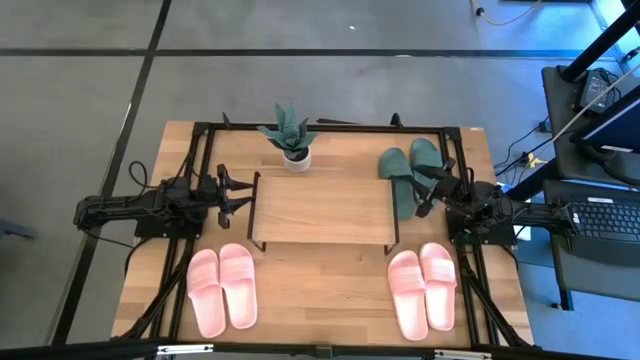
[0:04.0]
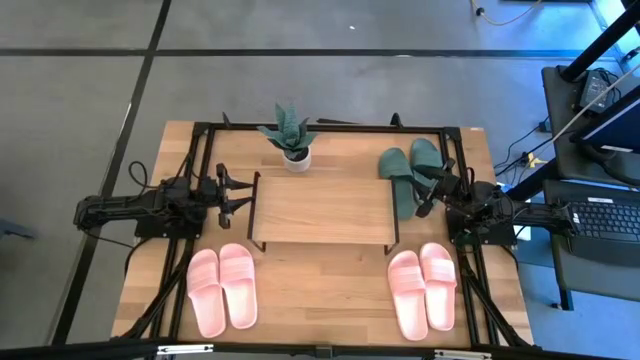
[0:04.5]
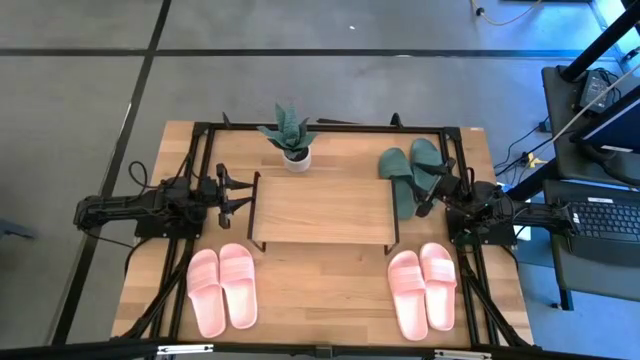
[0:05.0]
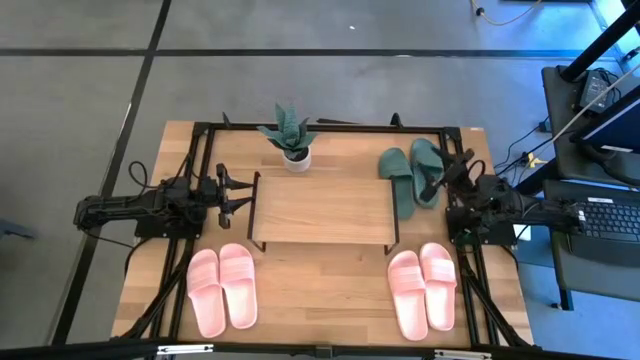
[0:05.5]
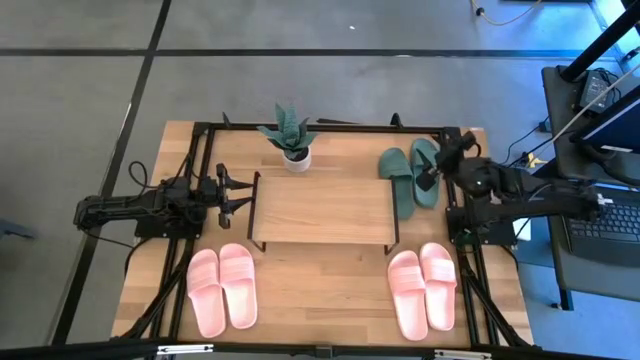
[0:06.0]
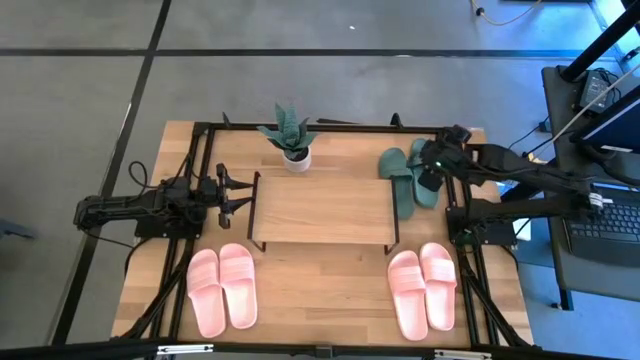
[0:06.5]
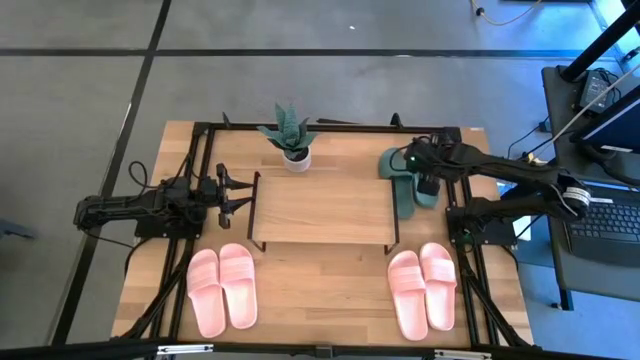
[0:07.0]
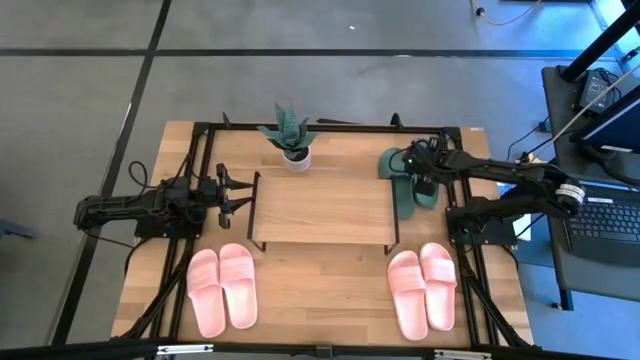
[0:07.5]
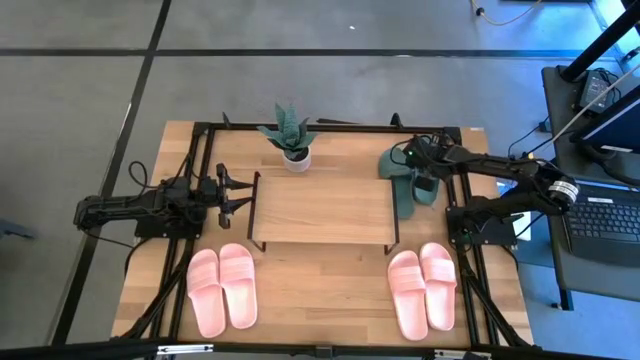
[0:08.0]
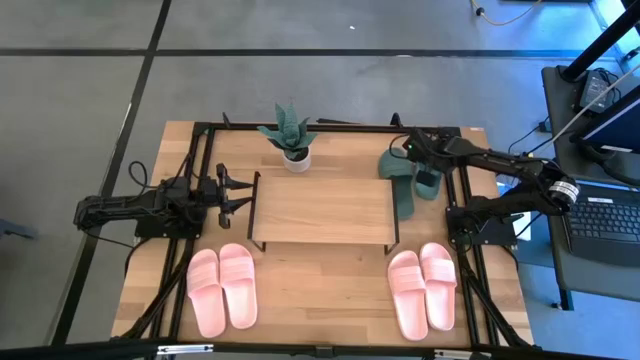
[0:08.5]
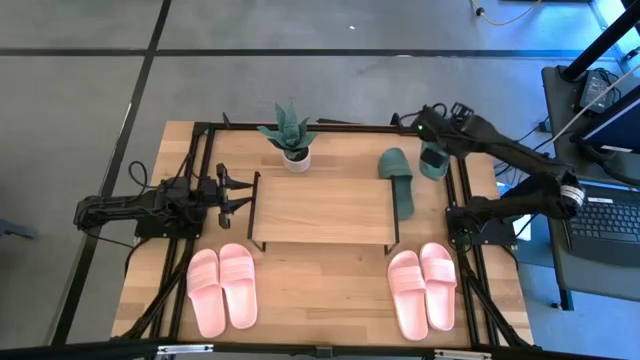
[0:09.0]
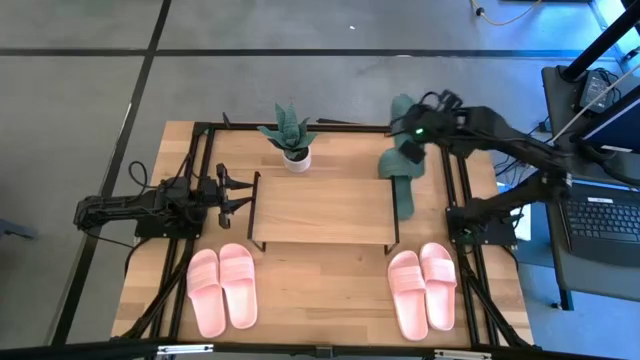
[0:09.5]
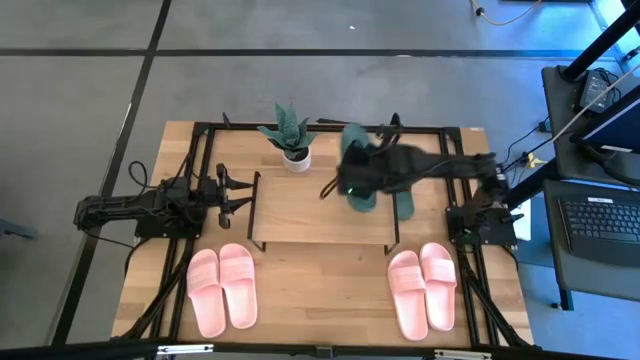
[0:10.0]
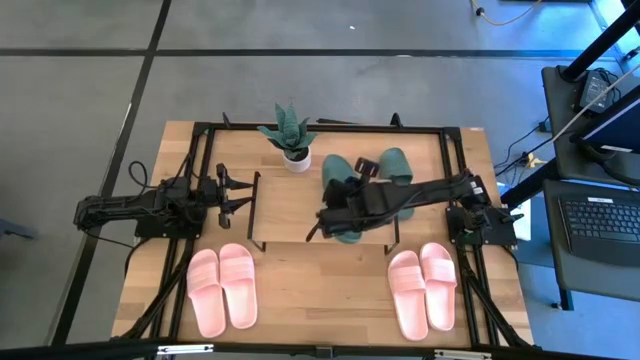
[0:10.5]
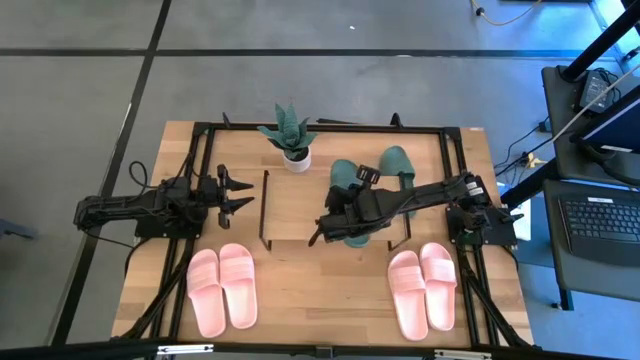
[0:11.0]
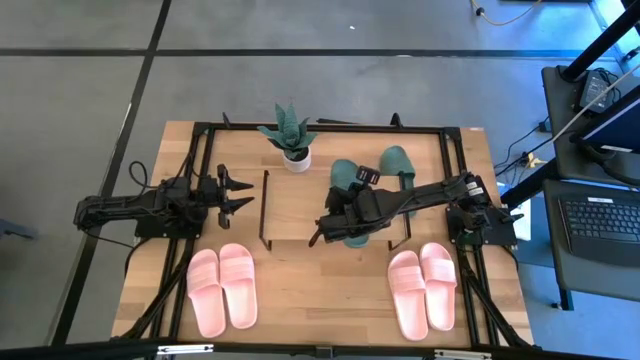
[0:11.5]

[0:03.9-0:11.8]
Task: Pick and place slides into the shelf
Put the right blue slide on the shelf

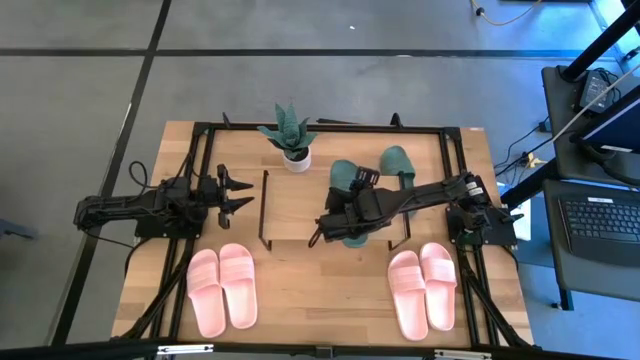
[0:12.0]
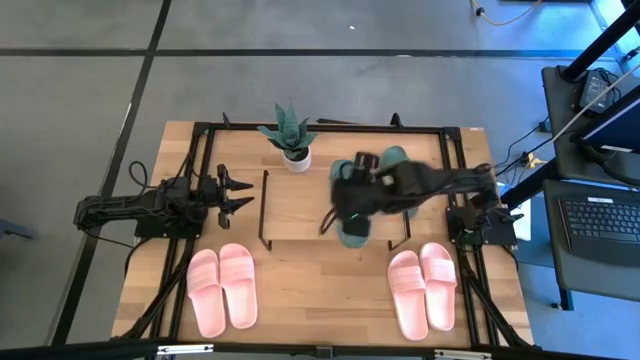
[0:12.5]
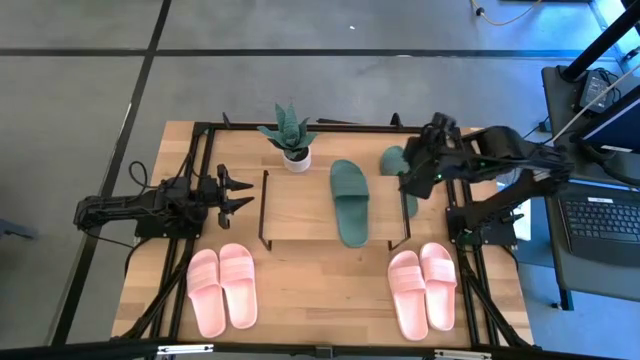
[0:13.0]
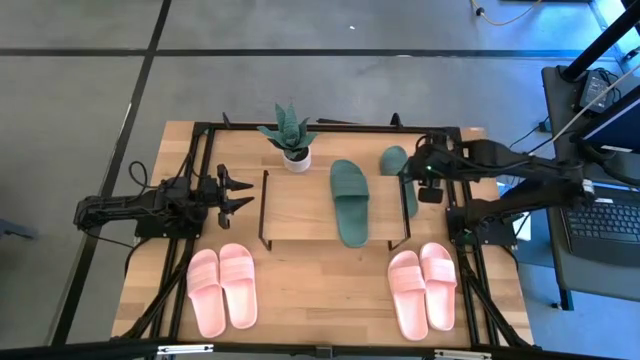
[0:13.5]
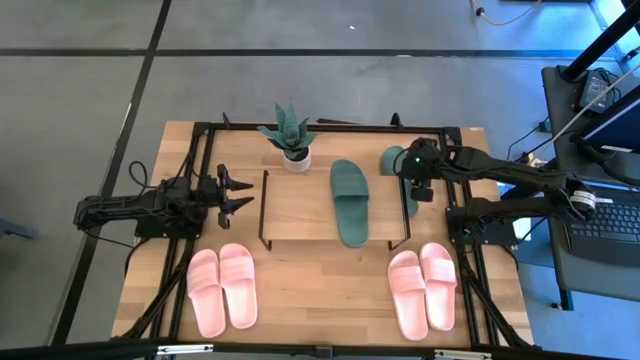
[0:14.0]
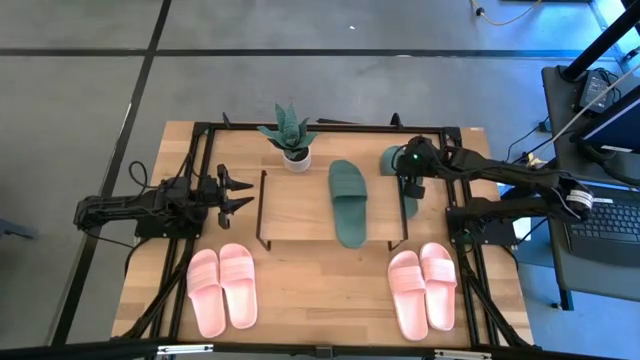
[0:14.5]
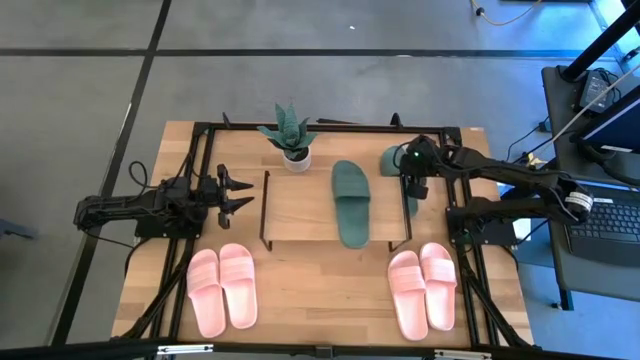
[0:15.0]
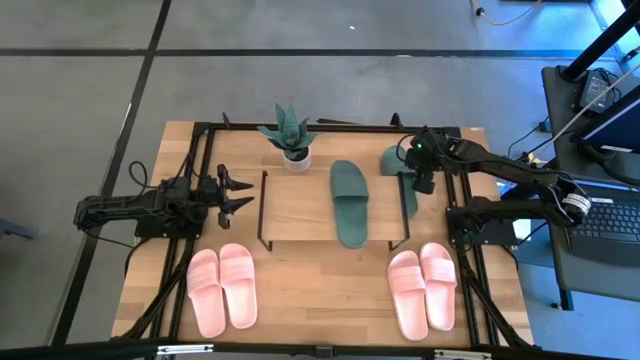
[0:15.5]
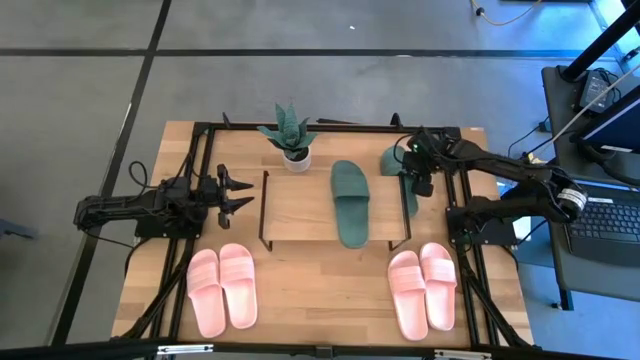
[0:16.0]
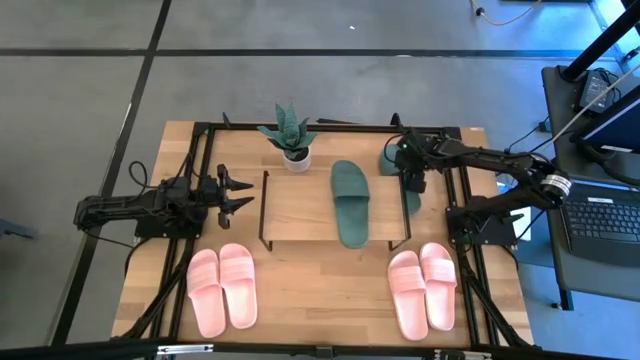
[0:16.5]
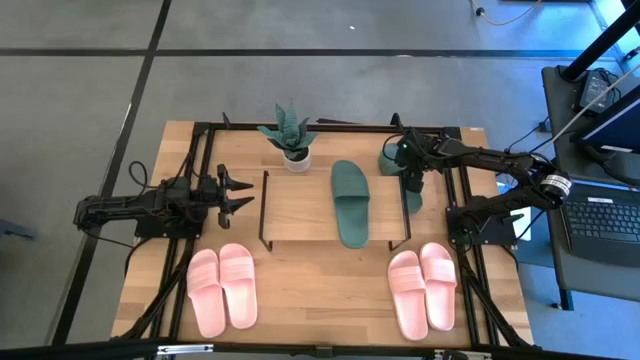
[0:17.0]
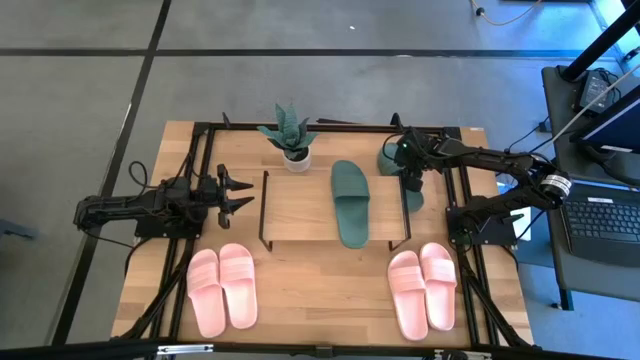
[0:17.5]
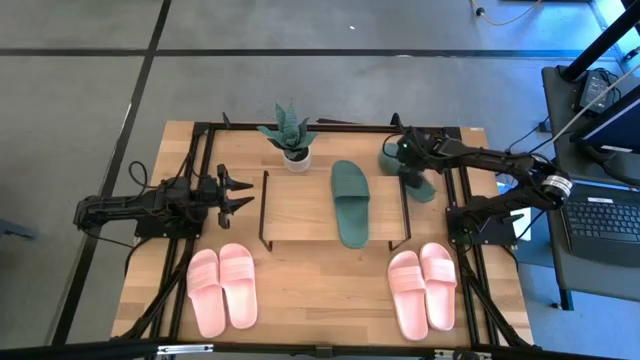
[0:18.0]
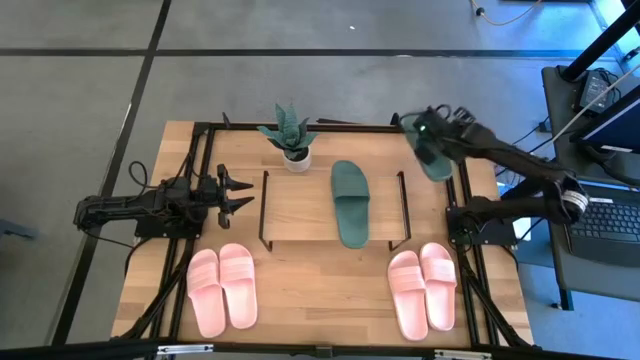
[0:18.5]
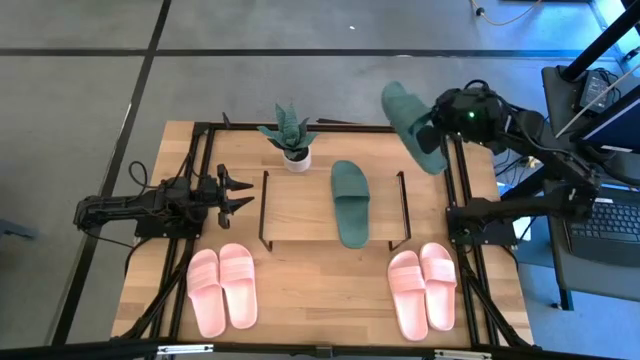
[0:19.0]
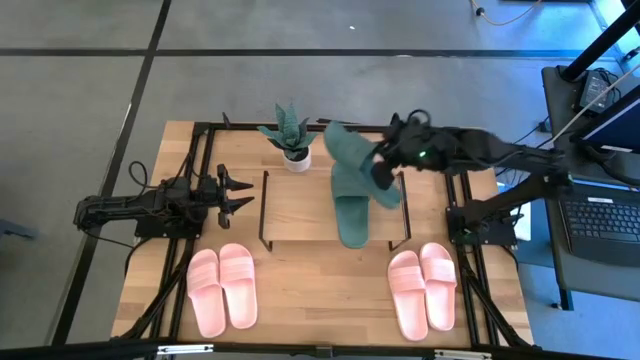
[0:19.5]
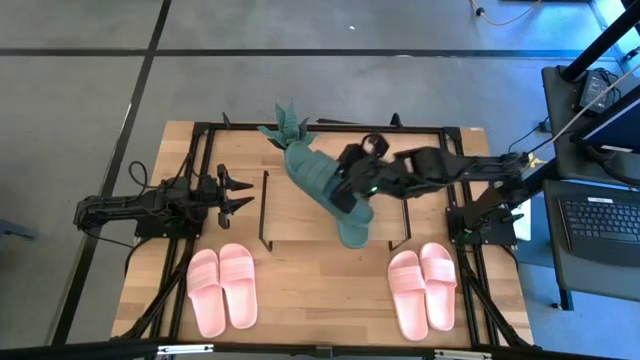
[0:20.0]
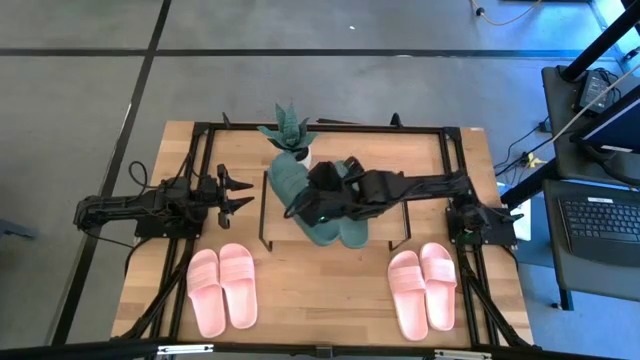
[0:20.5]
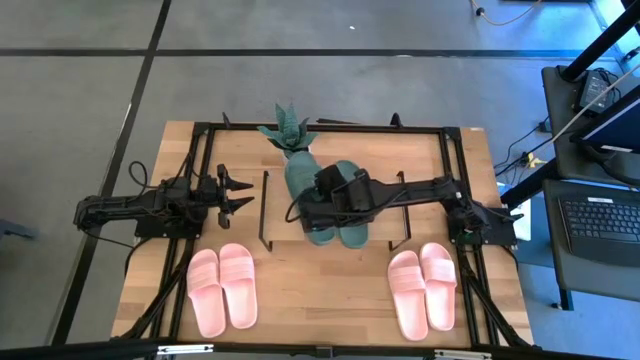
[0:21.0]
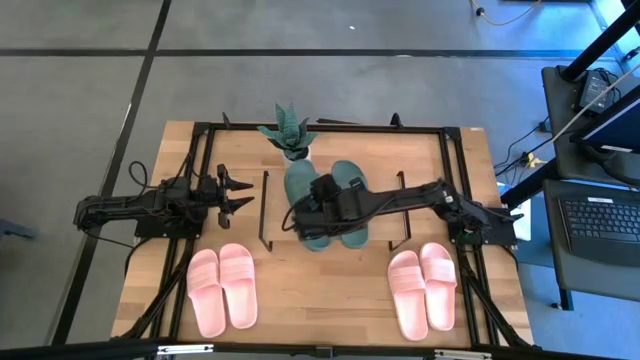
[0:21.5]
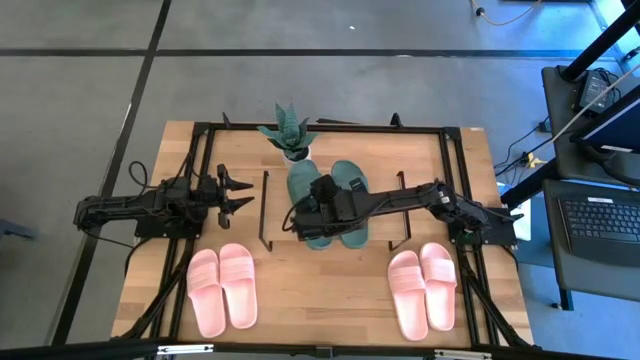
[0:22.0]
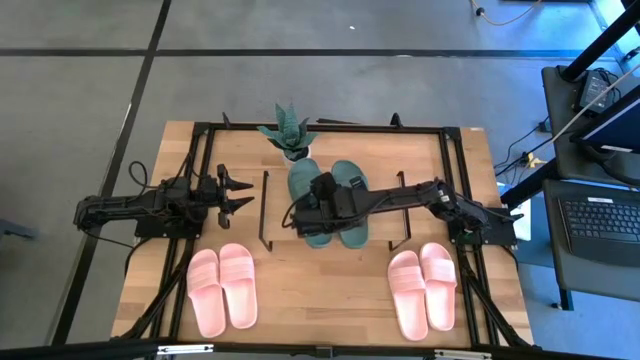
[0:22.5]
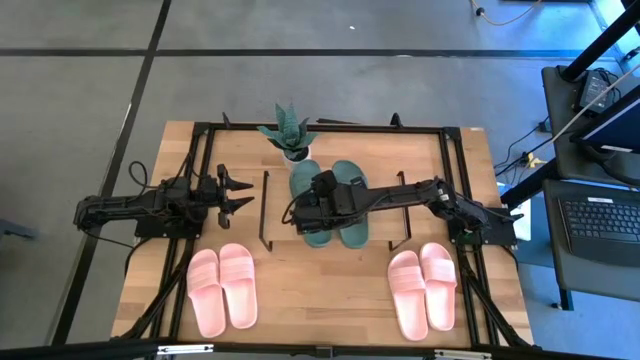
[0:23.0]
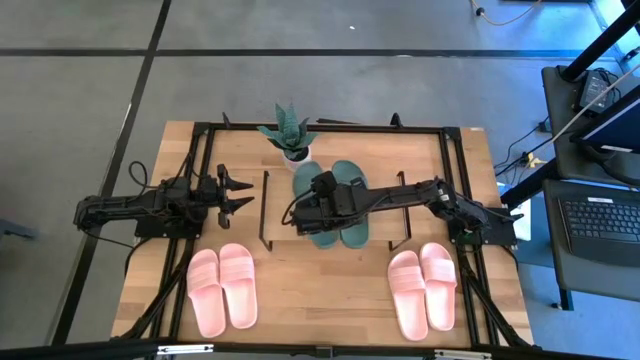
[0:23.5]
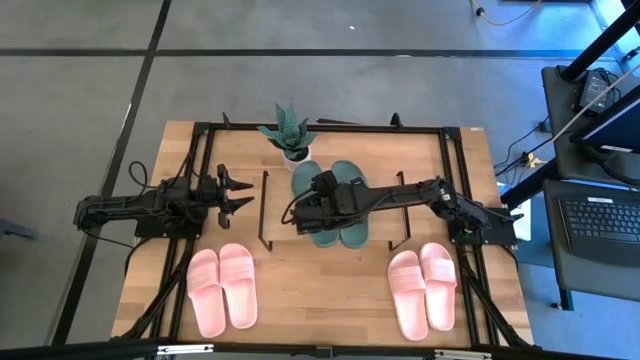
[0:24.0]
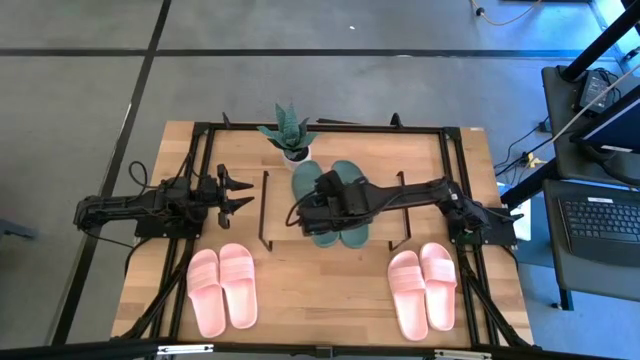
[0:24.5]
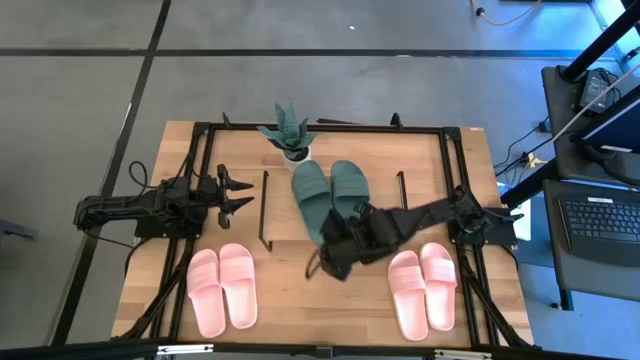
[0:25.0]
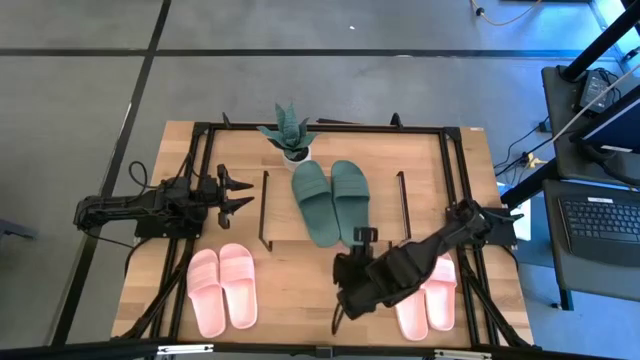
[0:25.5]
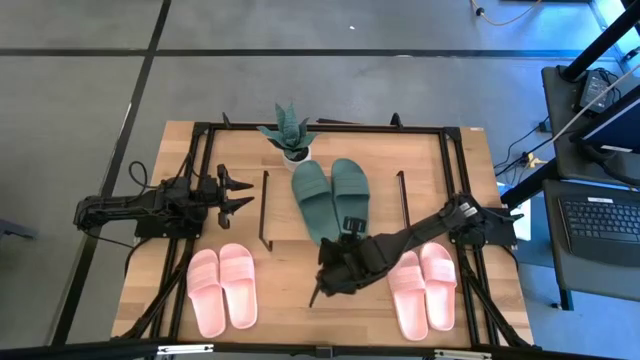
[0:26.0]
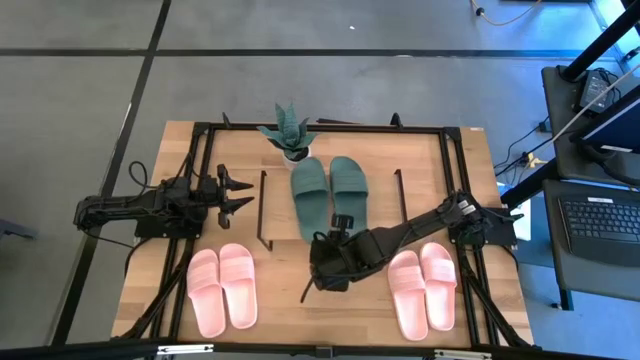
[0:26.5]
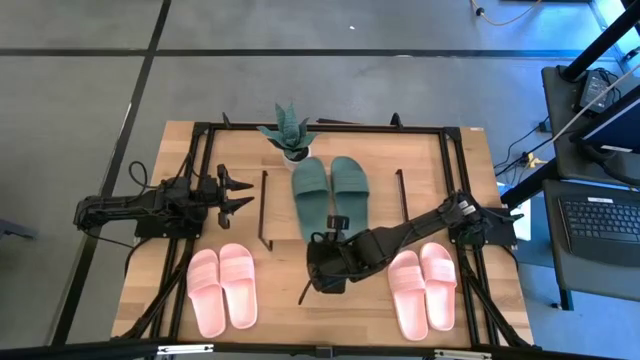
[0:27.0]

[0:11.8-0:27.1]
Put the blue slide on the shelf
